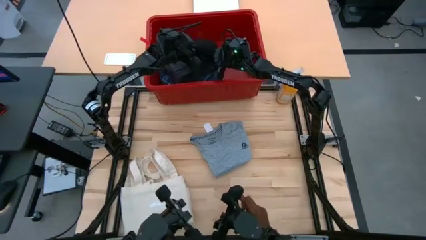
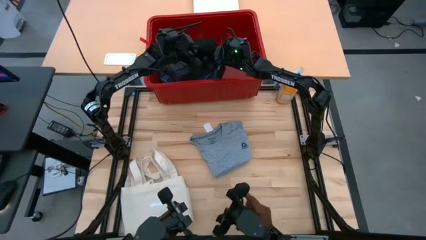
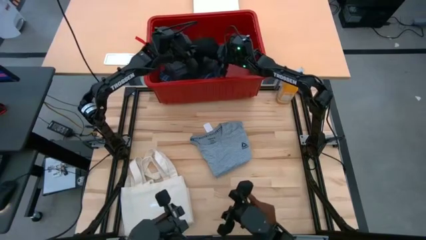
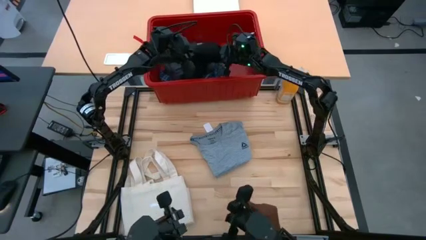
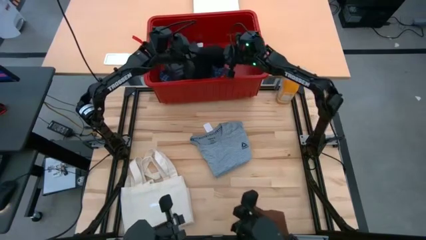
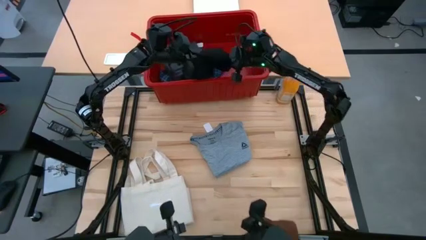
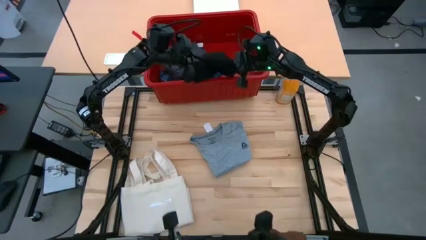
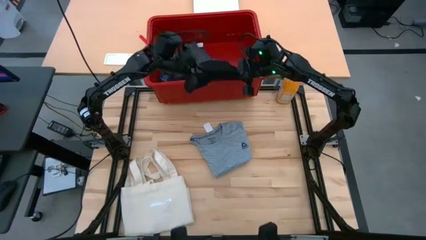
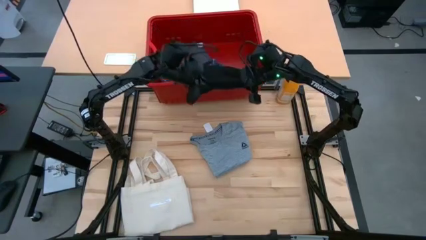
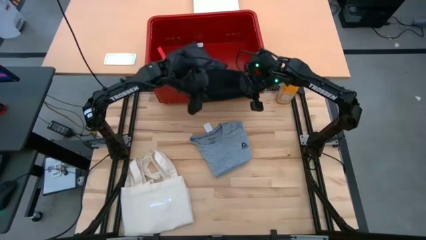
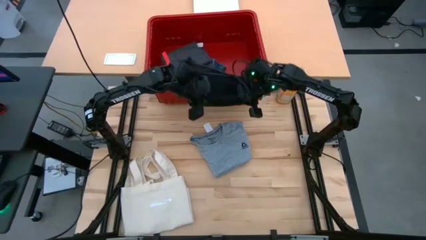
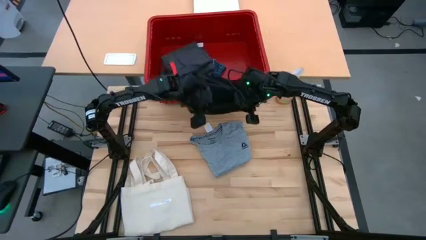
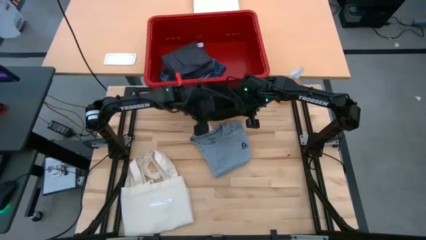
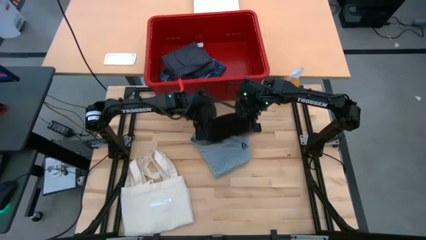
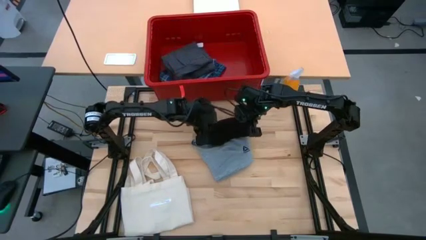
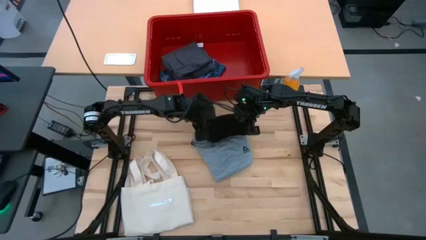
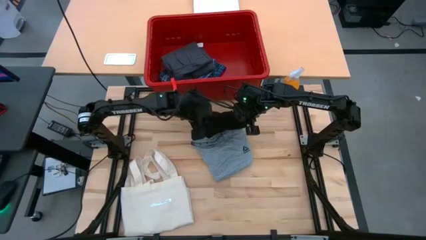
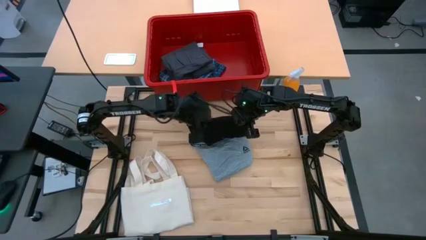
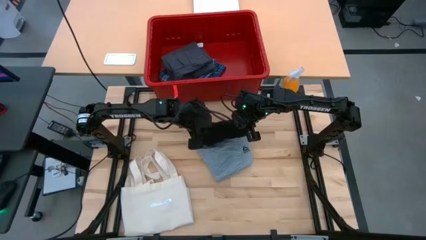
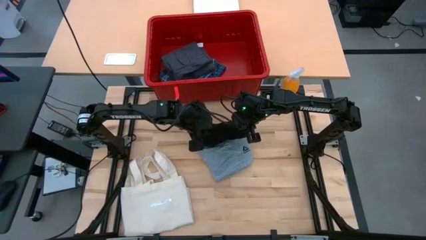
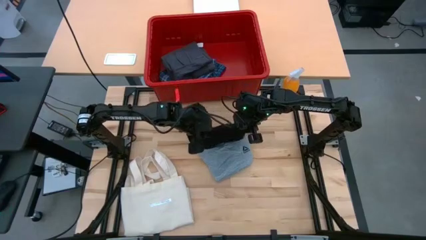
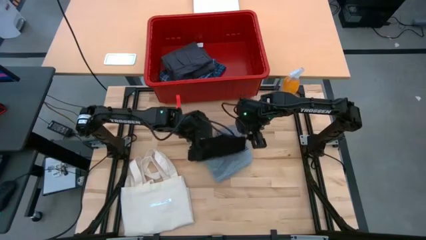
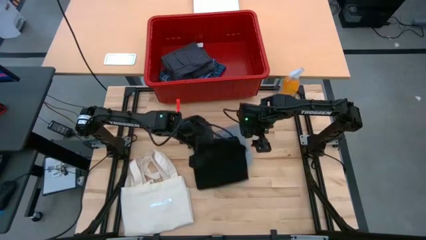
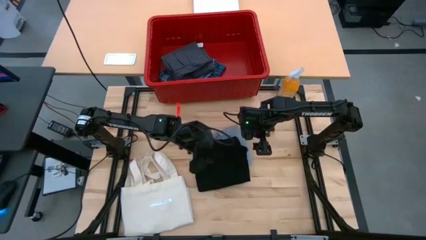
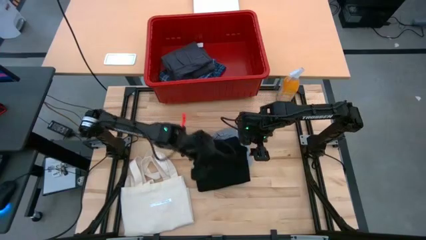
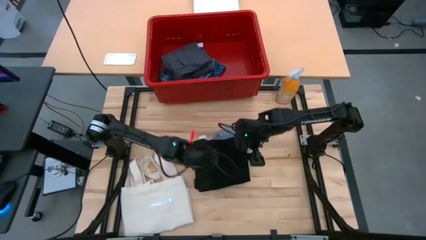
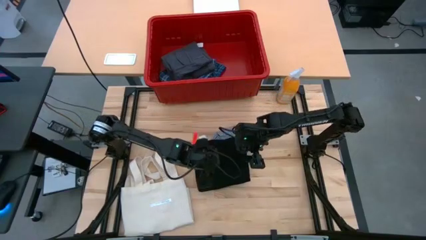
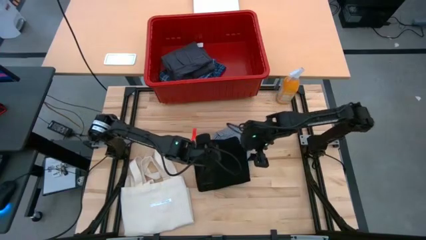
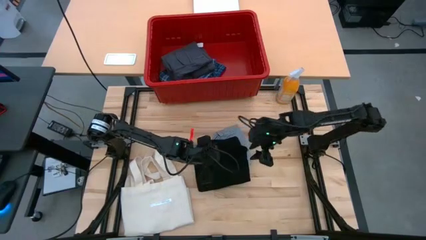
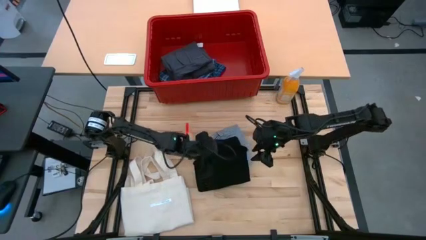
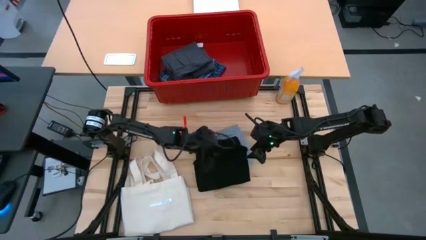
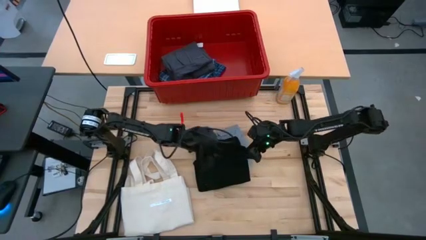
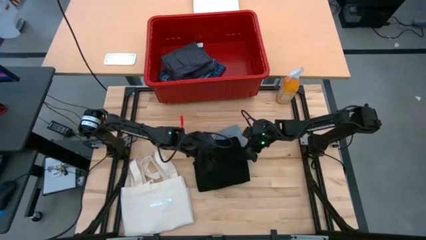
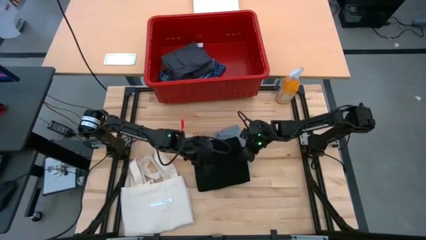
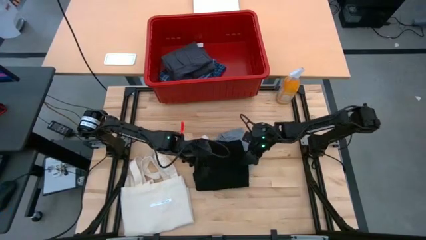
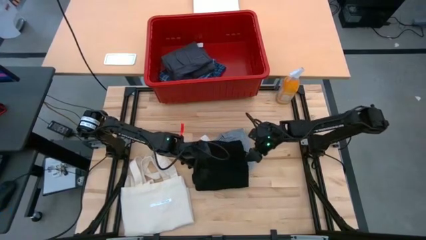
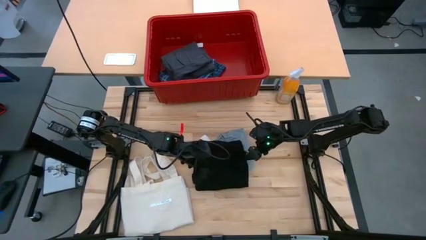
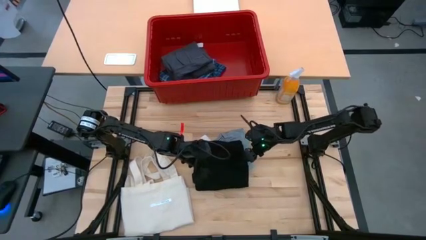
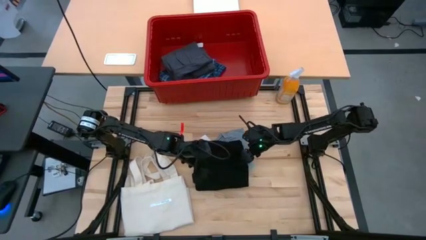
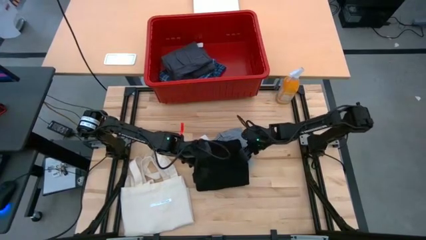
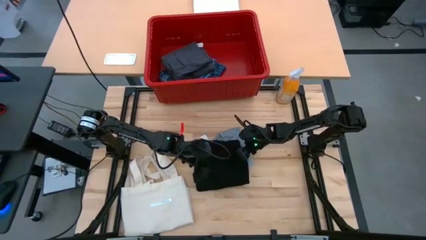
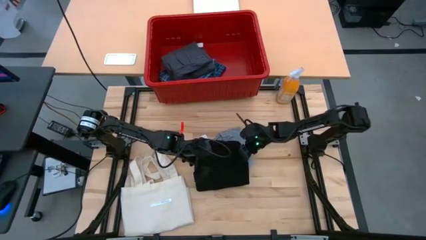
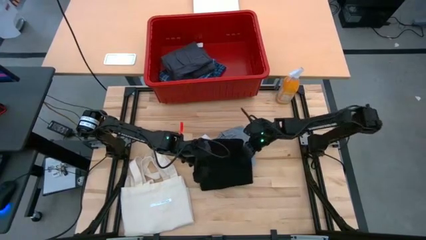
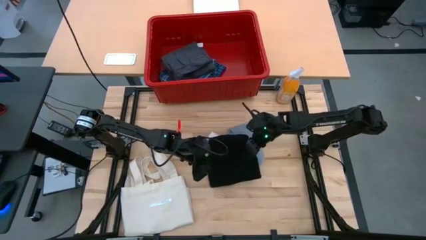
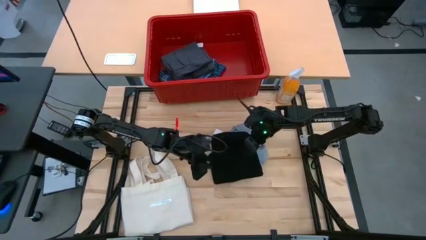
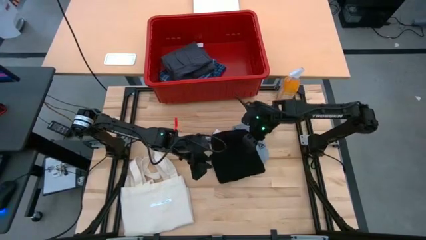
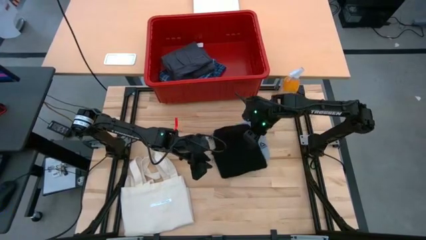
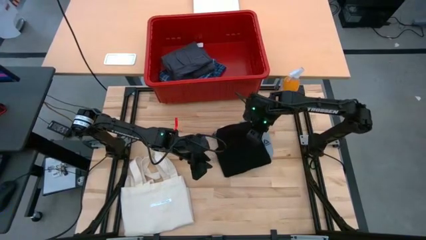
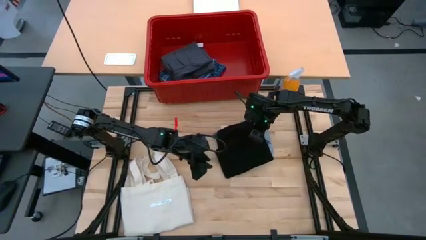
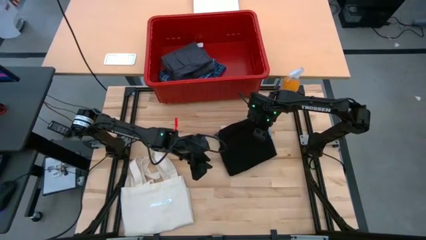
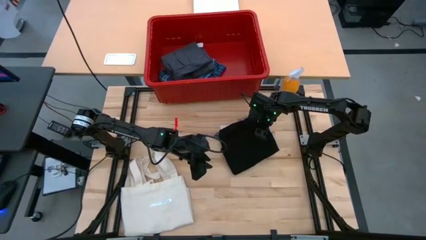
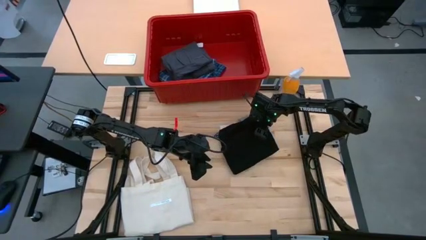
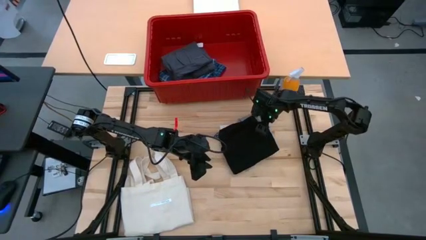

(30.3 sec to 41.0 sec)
Task: Fold laundry
Remove the black t-shirt from the red organizer bin
